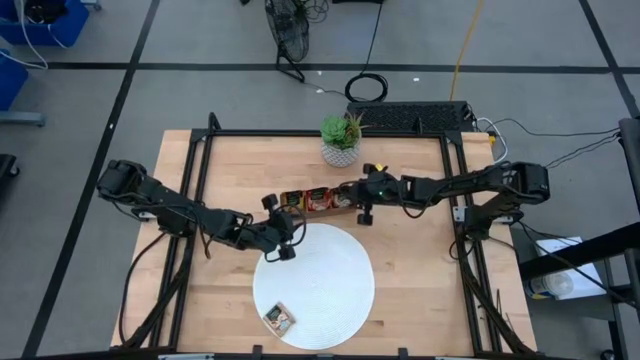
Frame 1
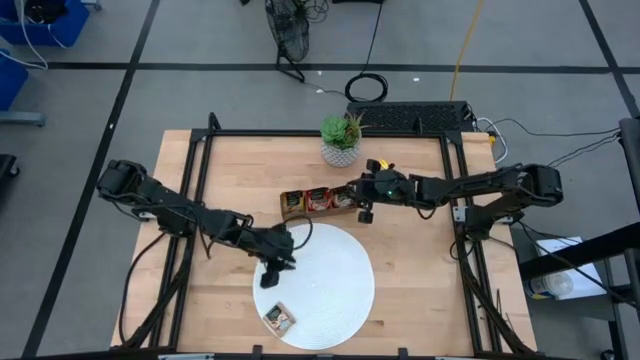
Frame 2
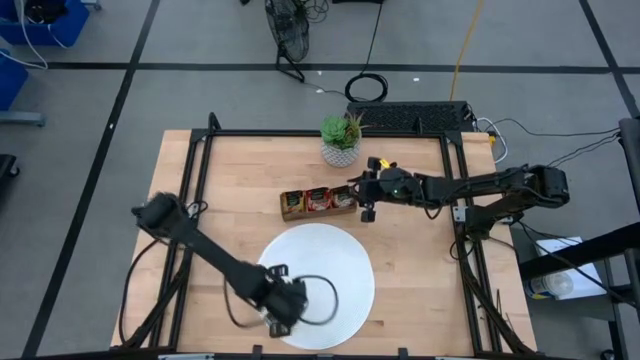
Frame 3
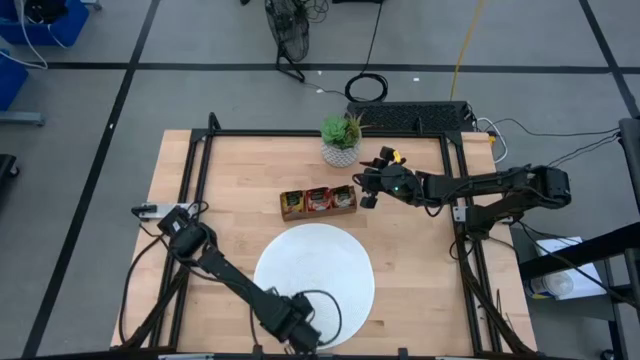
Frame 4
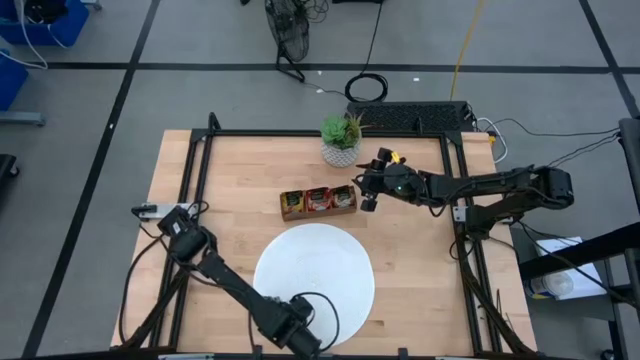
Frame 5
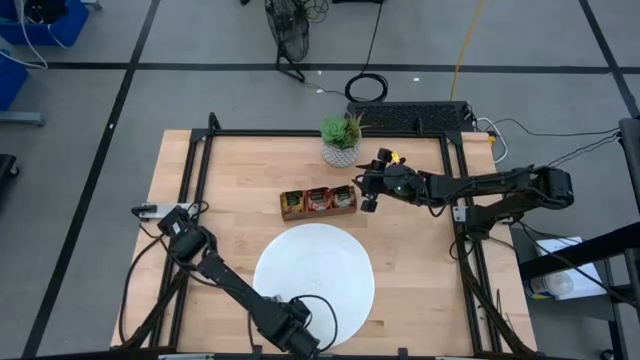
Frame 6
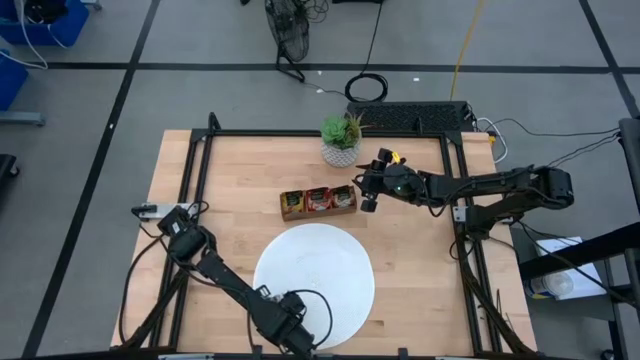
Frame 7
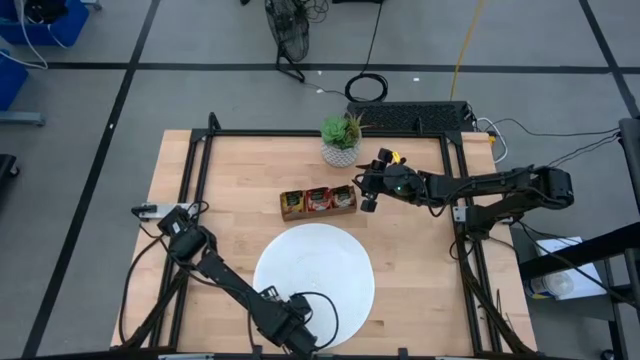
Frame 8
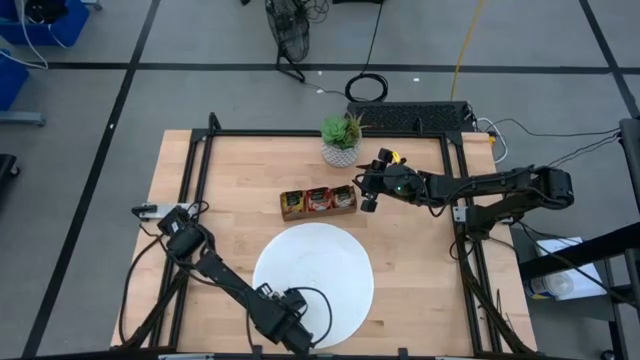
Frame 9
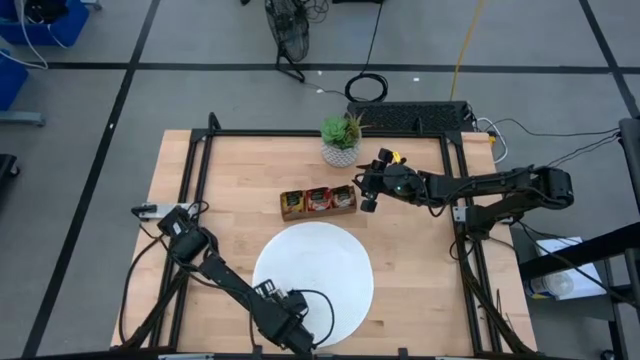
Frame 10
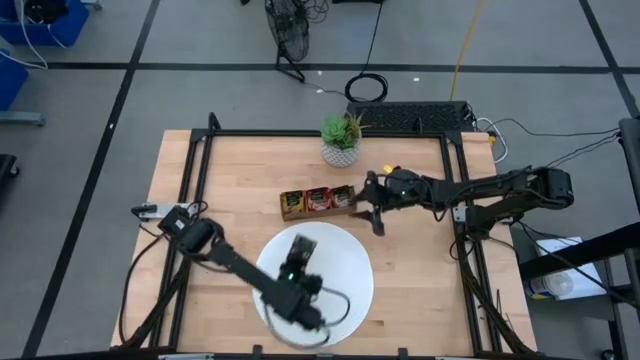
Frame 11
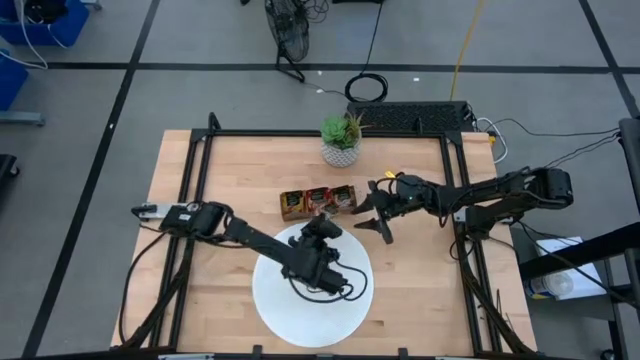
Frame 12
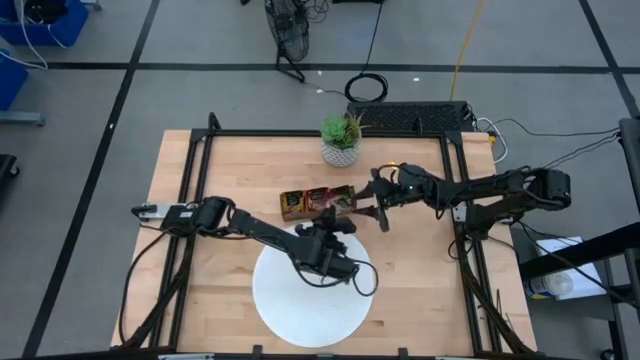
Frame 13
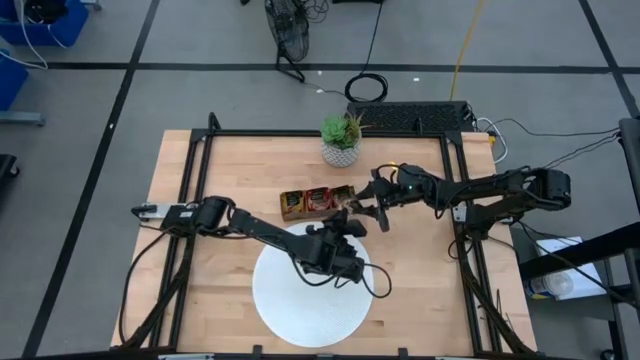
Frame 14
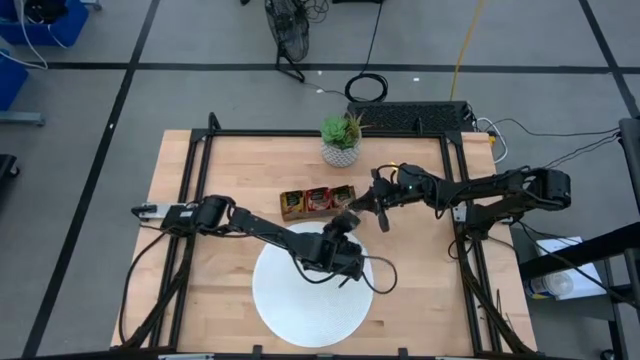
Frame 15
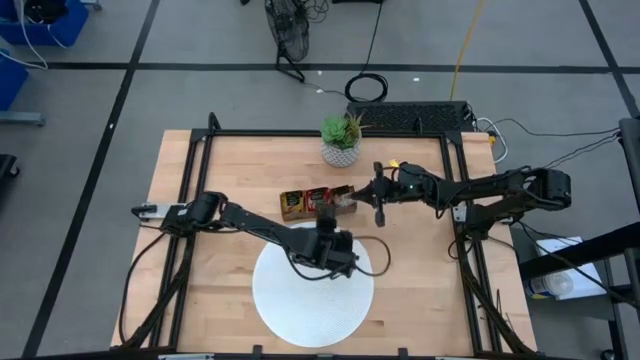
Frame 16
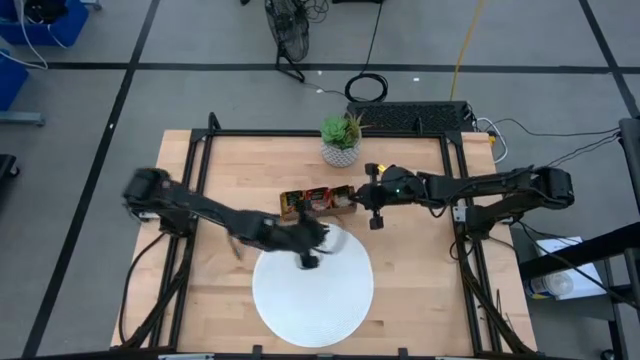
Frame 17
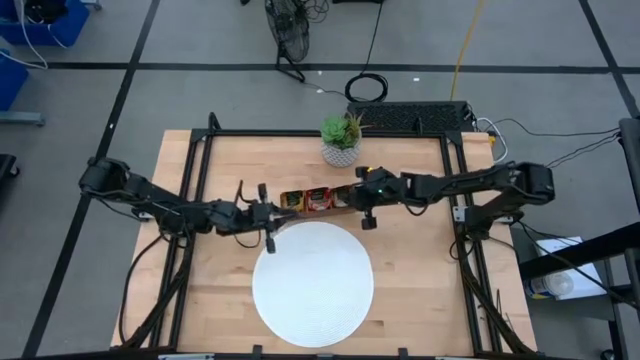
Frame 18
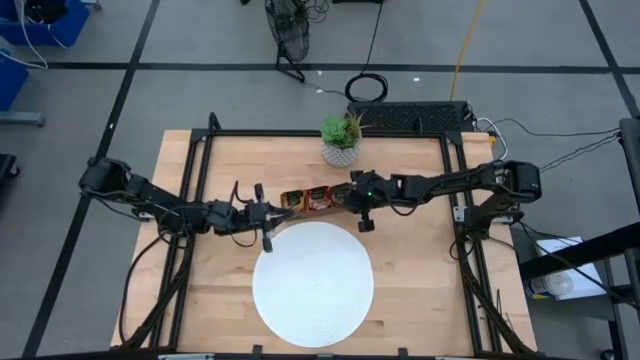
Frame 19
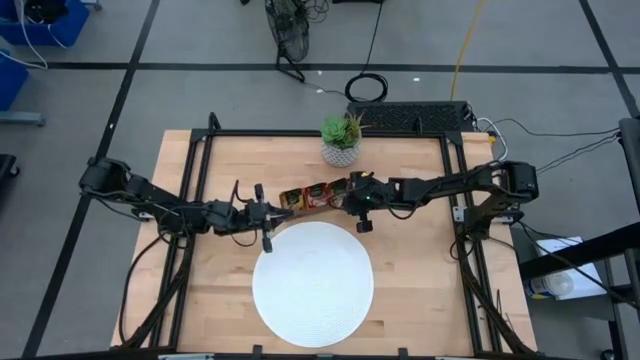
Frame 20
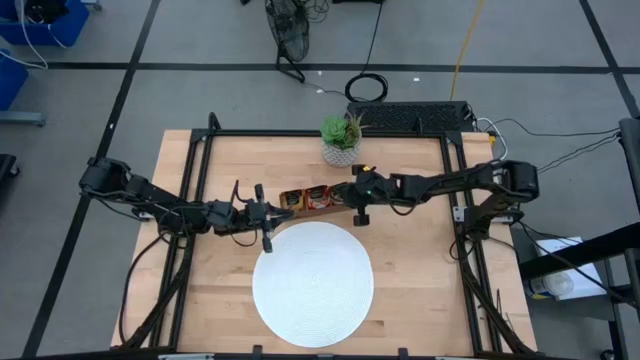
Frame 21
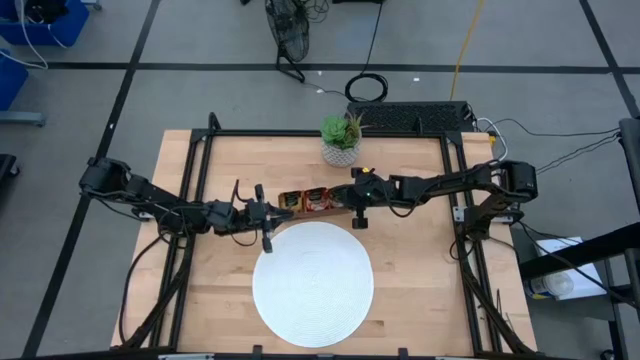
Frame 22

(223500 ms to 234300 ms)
Task: Pick & Place Tea
Put the vanilla tea bag into the wooden organizer

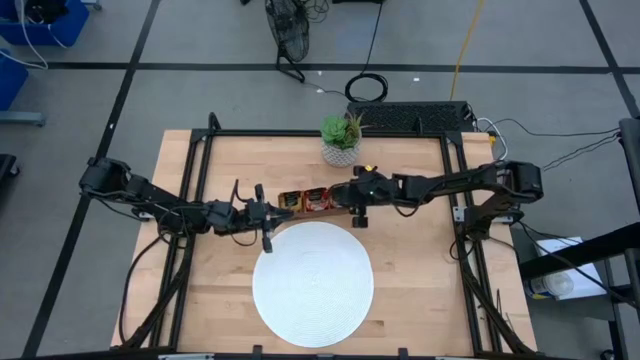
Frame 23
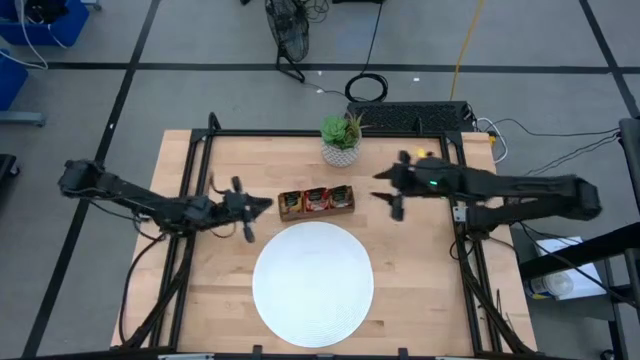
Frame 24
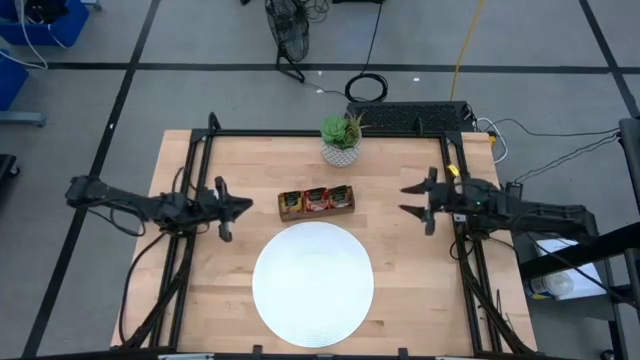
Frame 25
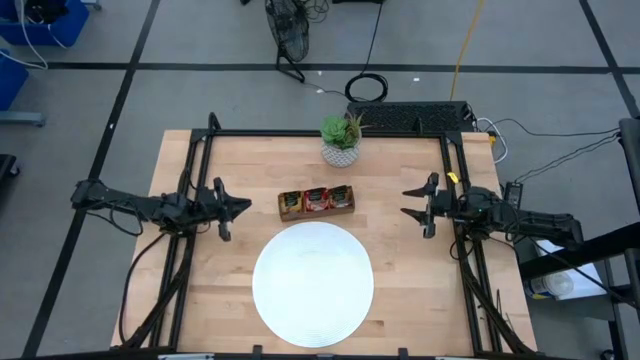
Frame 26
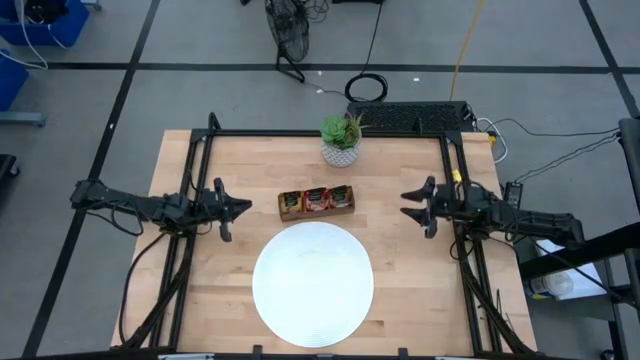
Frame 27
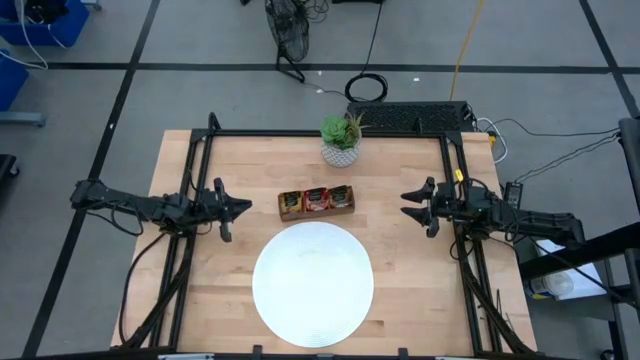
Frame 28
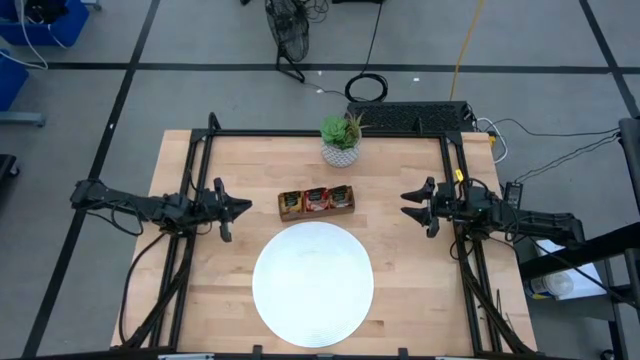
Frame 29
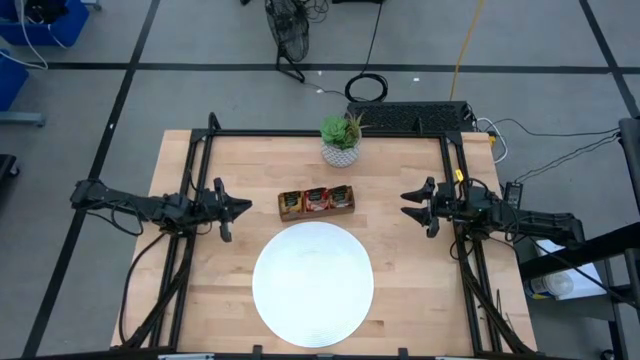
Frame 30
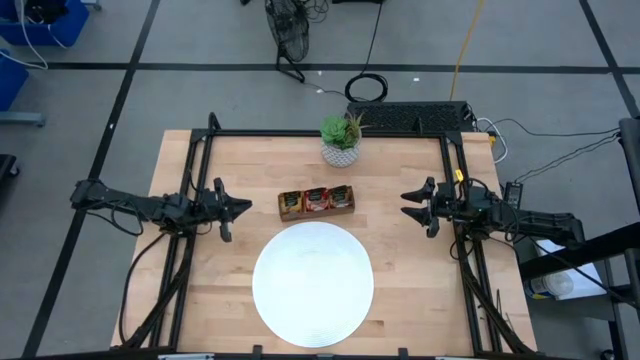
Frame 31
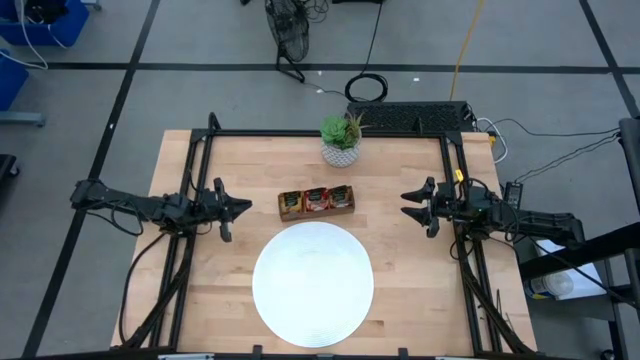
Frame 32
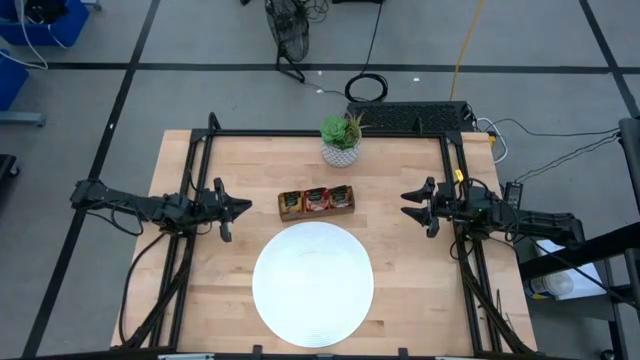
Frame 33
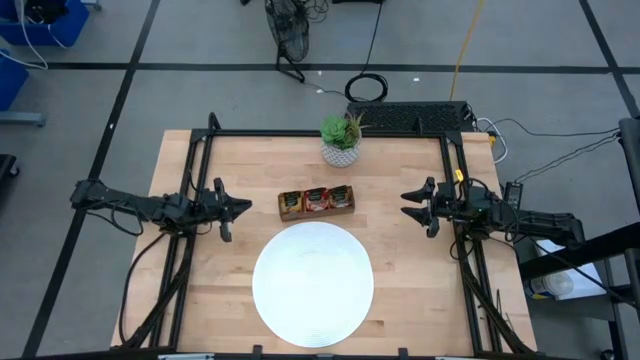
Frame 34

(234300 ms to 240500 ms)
Return to Home Position

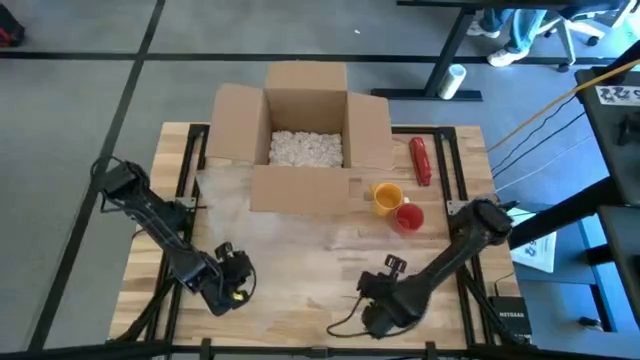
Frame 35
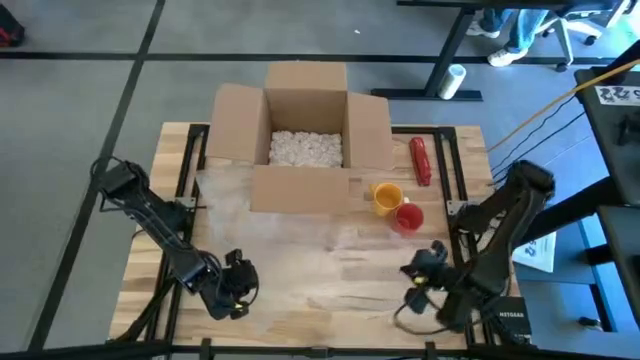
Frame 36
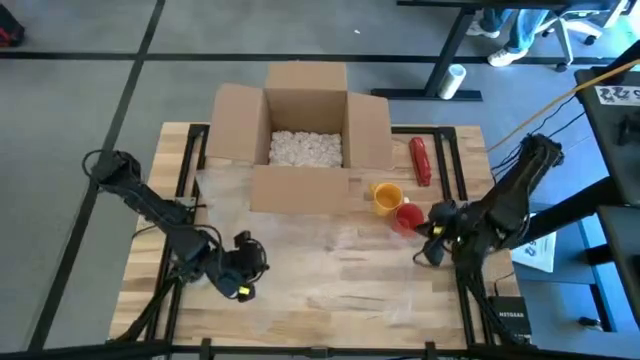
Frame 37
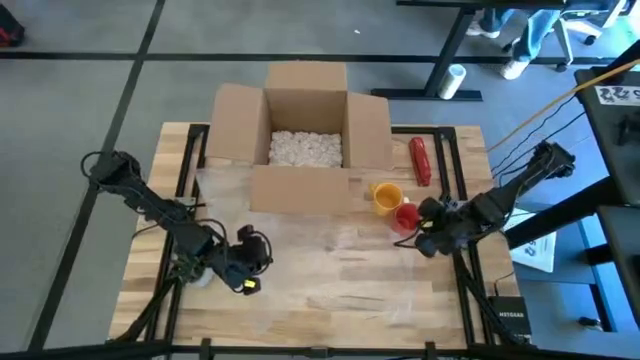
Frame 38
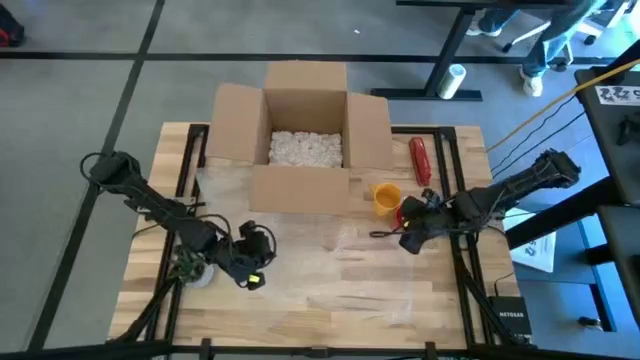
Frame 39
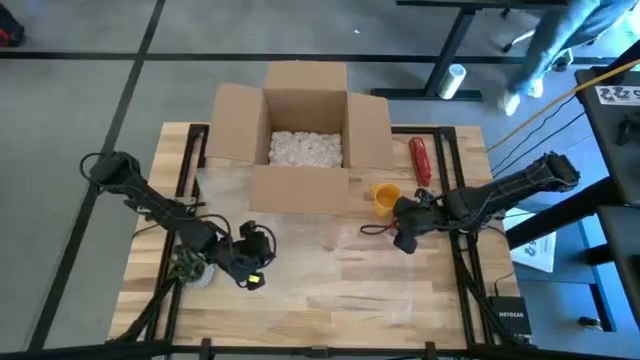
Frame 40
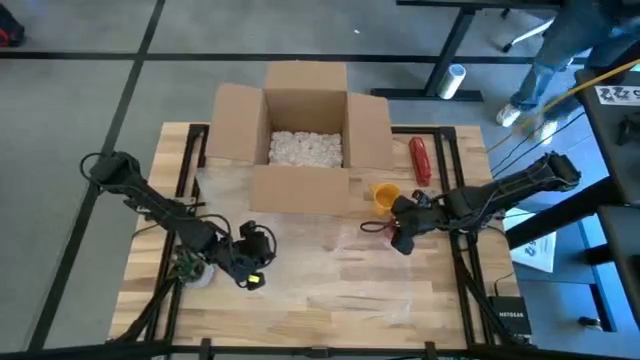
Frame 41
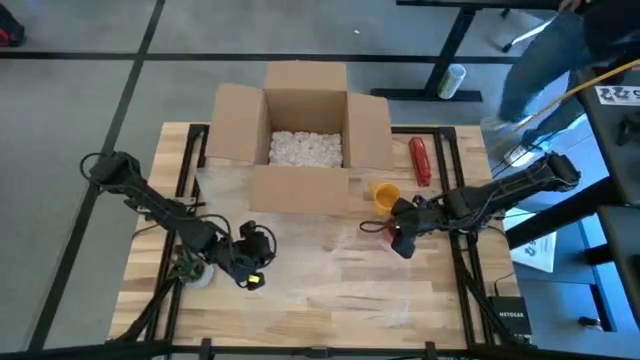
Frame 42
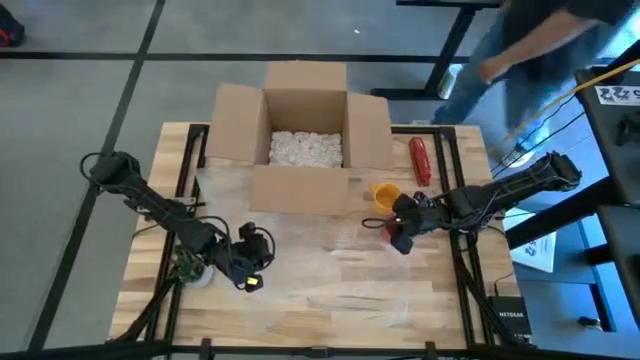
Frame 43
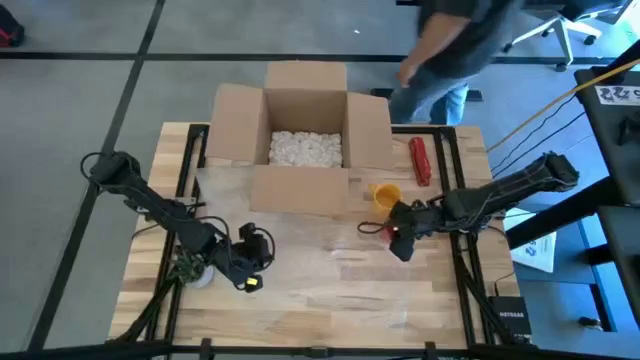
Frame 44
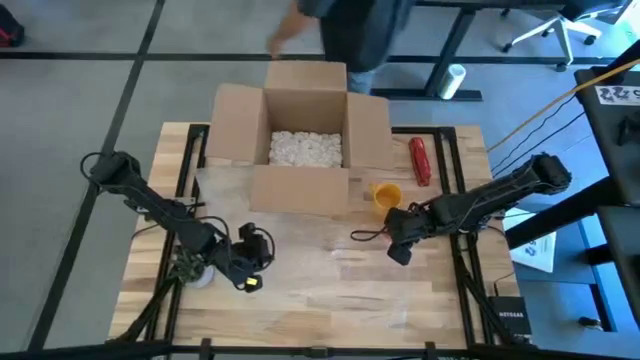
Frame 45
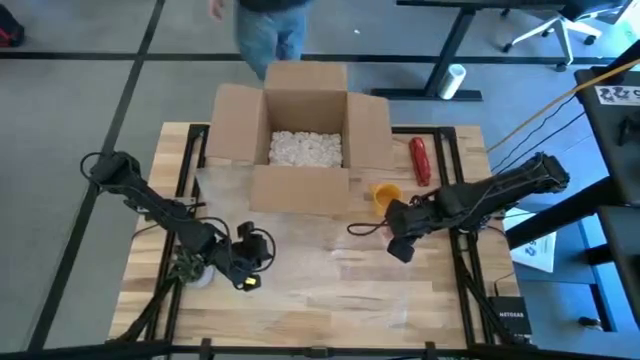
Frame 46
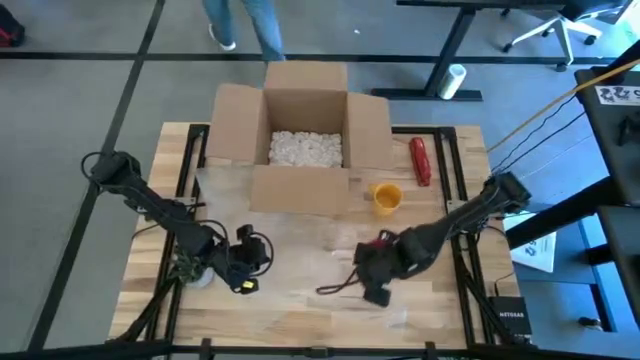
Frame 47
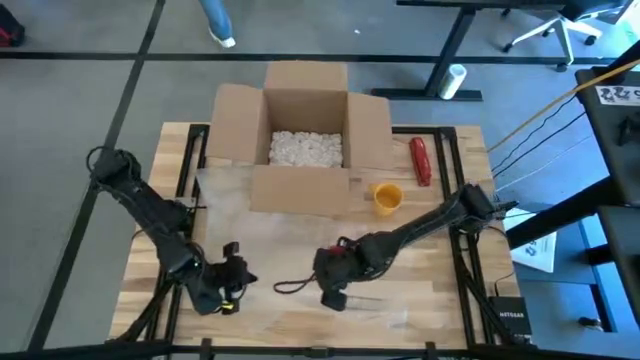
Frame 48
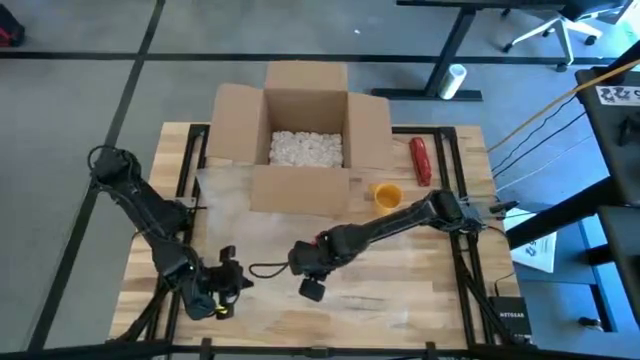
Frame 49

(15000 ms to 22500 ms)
Task: wrap mug
Put the red mug on the bubble wrap
